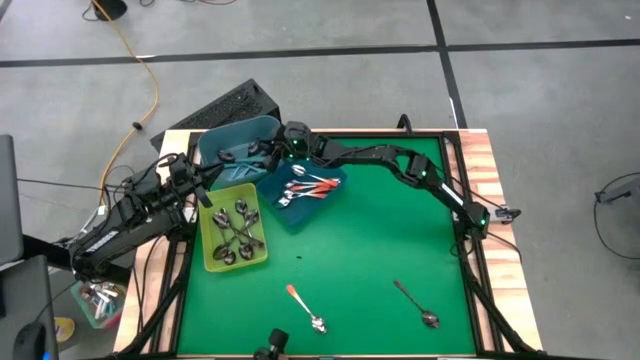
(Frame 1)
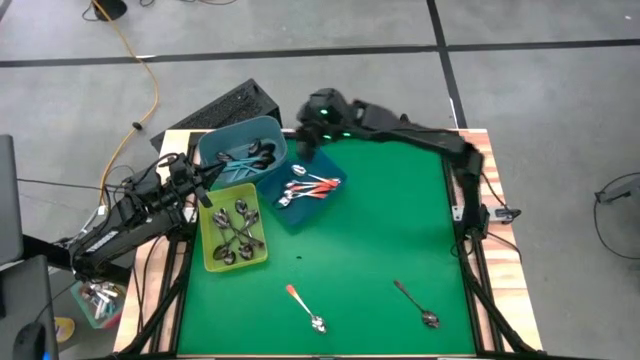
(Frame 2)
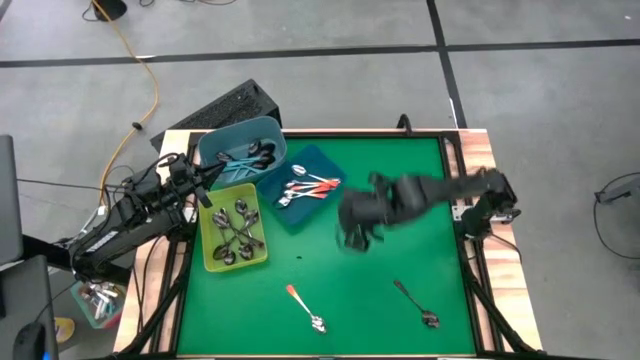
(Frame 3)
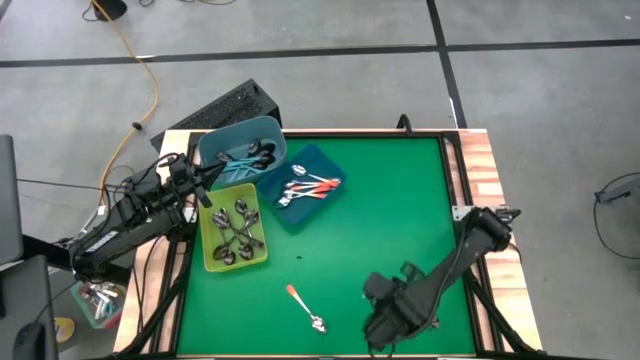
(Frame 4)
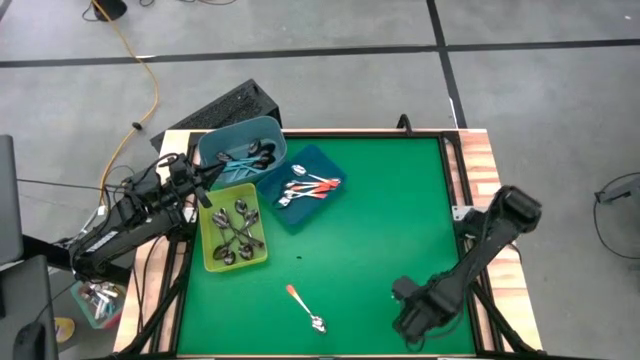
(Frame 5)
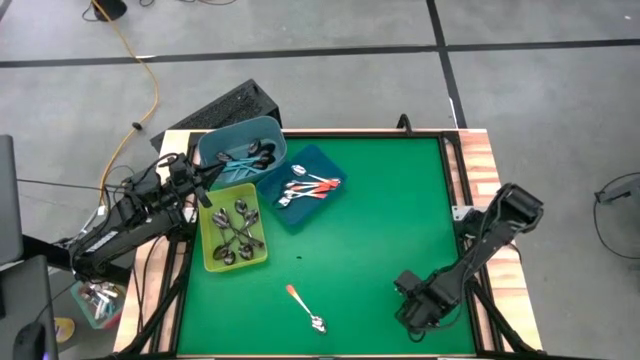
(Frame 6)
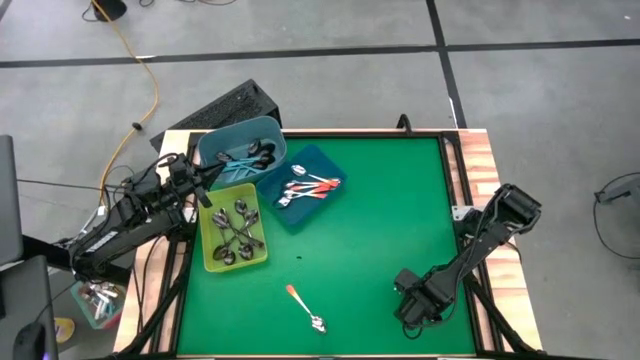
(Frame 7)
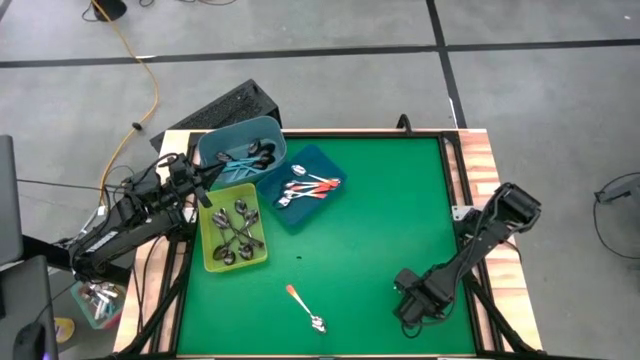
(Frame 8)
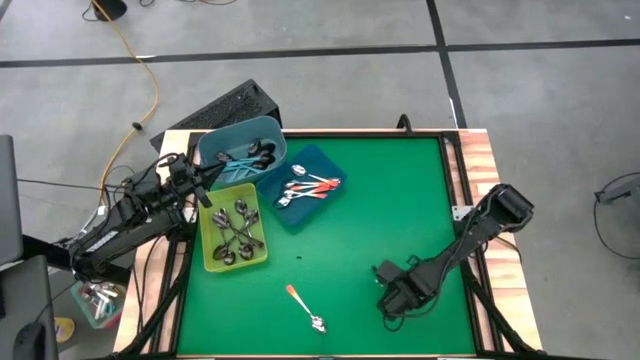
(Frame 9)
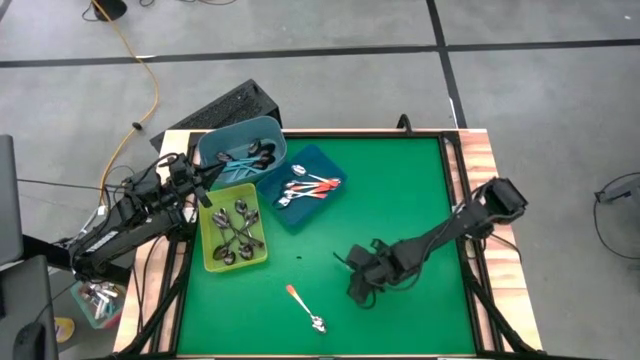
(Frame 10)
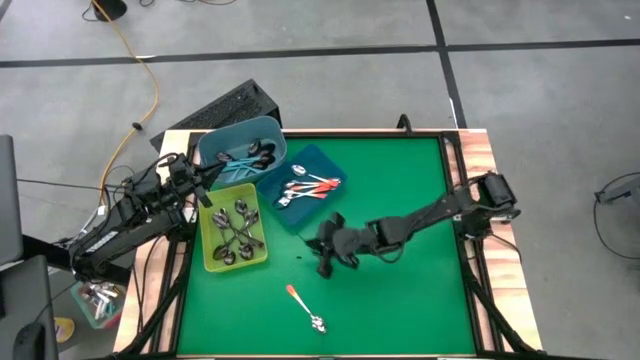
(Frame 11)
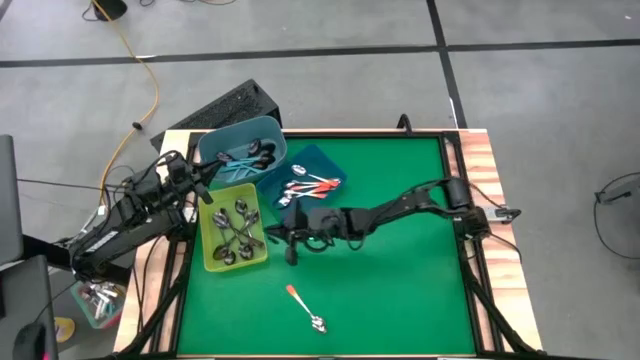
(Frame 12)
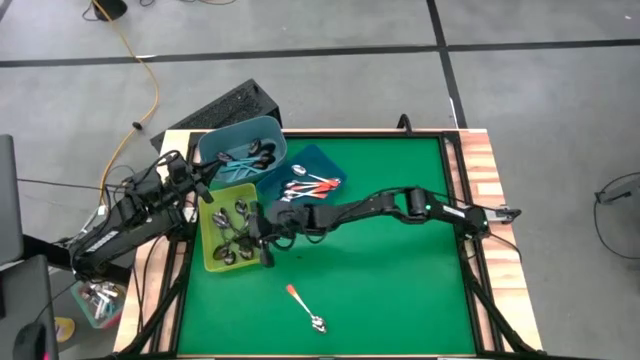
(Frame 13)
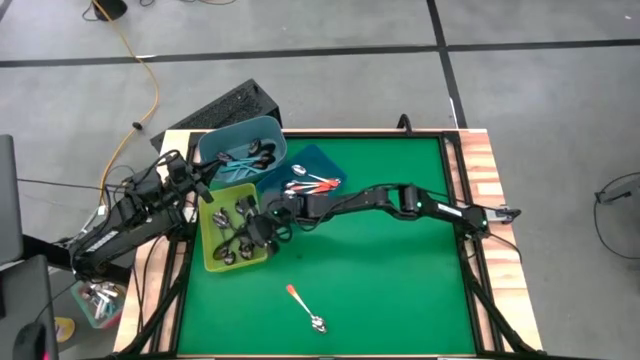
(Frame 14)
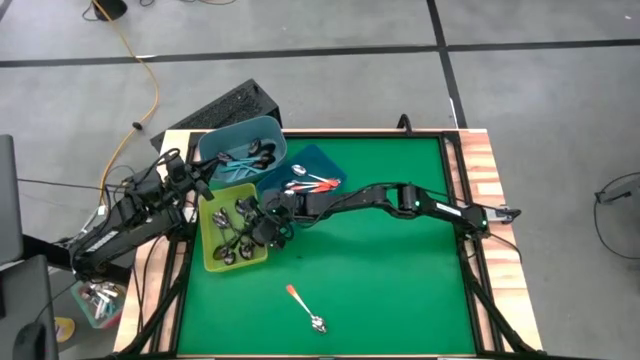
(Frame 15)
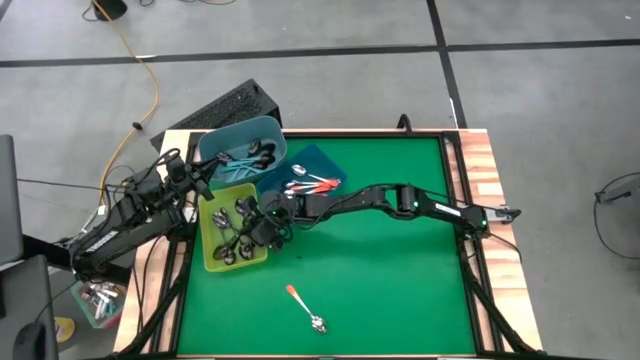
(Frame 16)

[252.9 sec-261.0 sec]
Task: Sort silverware by color (type)
Put the black spoon into the green bin

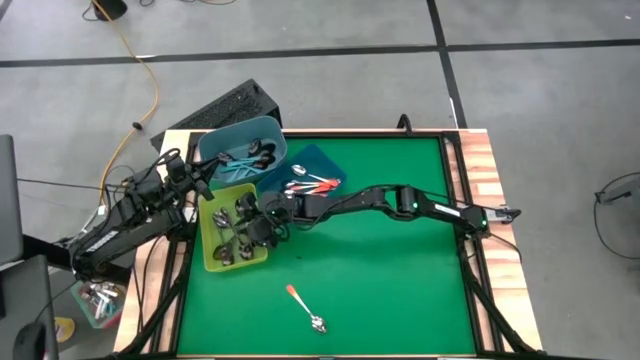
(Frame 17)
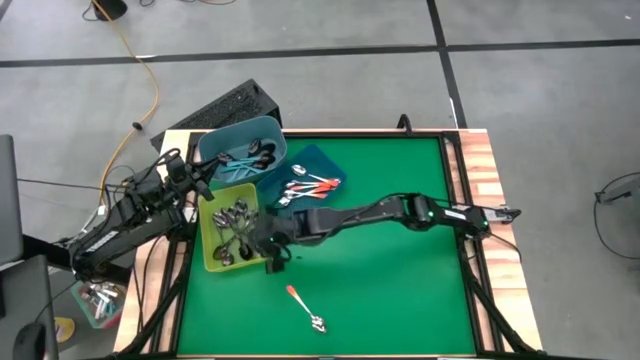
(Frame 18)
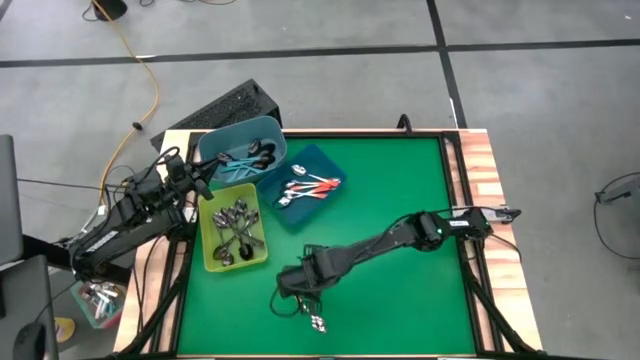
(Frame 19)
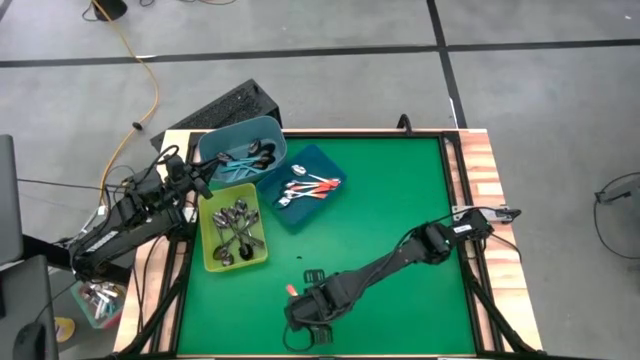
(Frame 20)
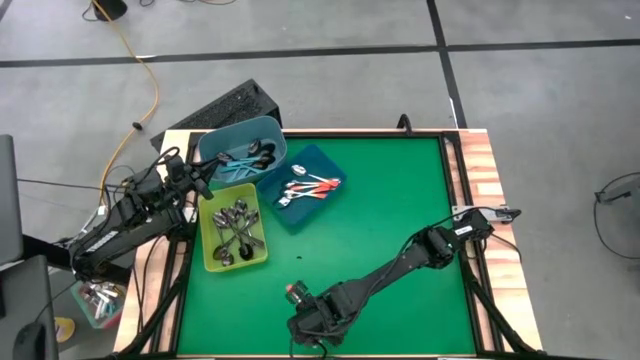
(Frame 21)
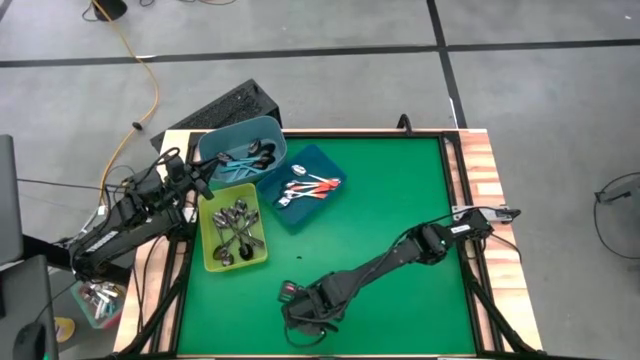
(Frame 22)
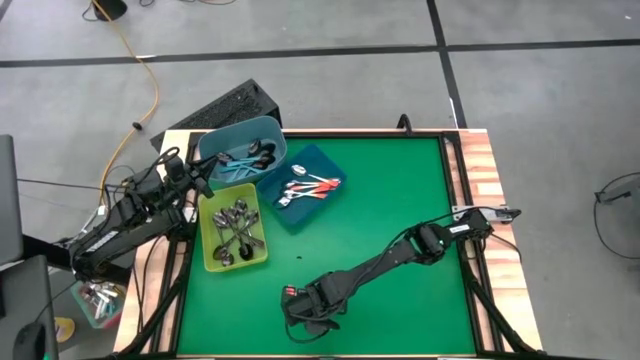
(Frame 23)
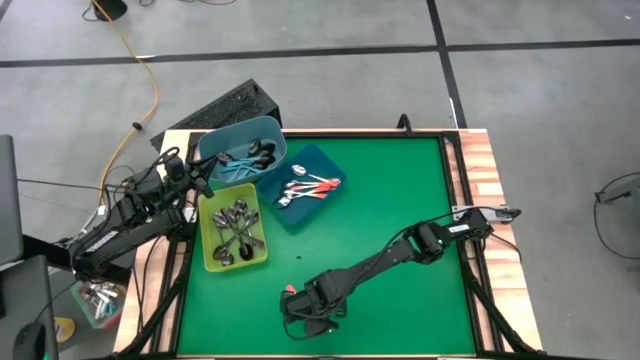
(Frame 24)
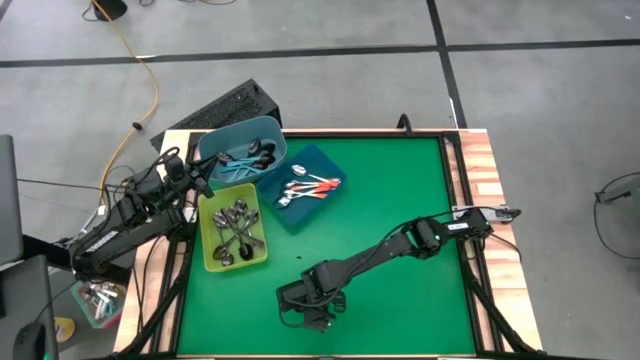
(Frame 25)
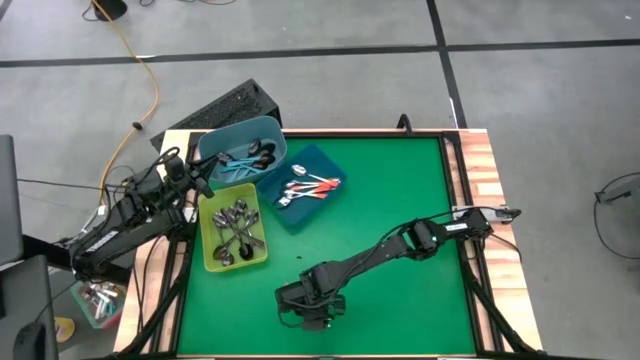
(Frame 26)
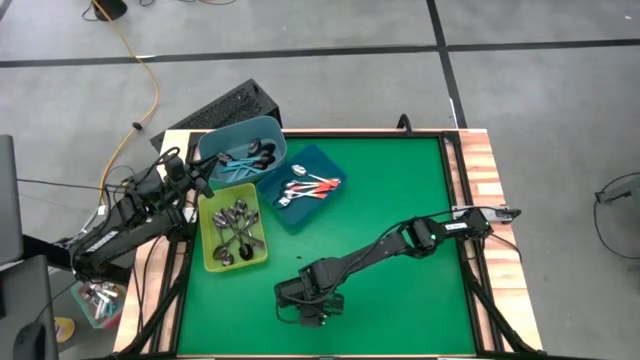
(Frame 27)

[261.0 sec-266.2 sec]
Put the orange spoon into the blue bin

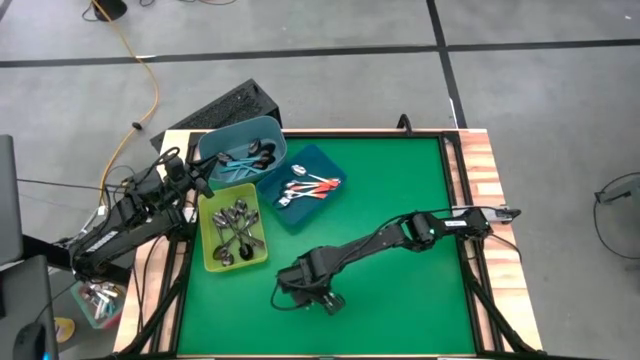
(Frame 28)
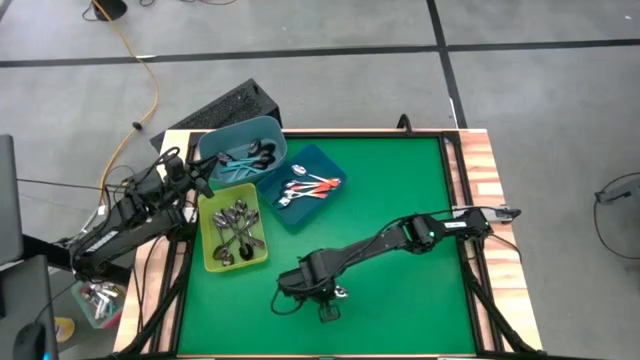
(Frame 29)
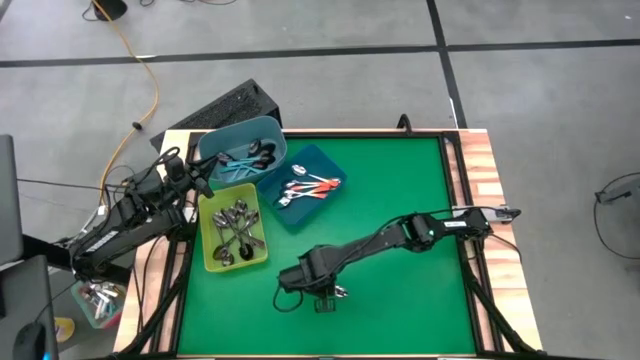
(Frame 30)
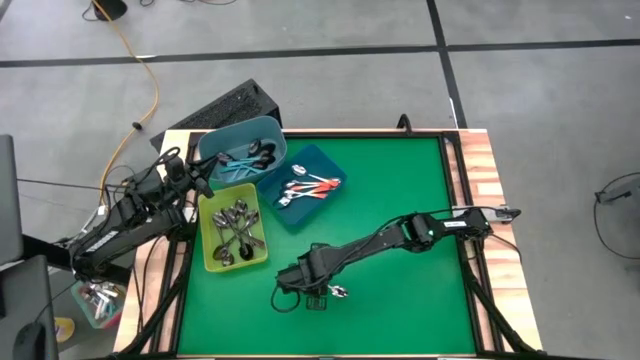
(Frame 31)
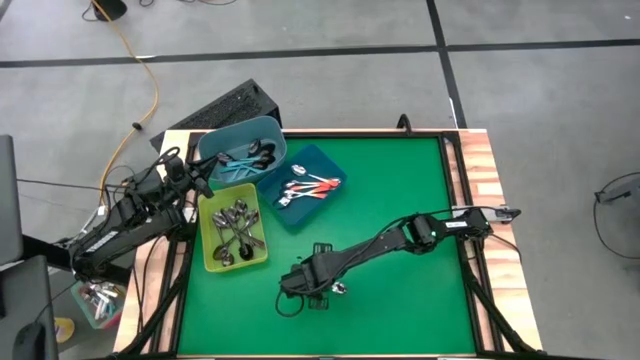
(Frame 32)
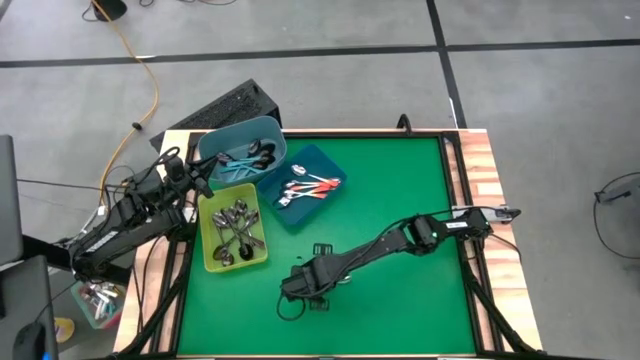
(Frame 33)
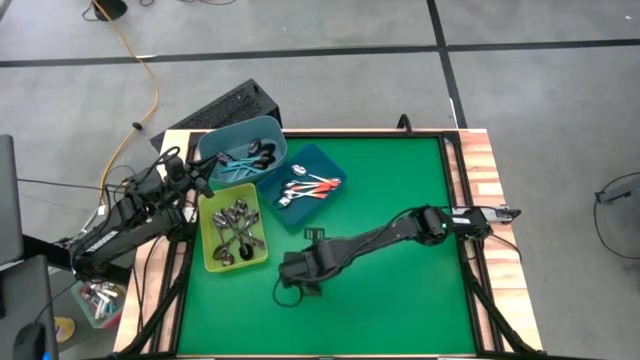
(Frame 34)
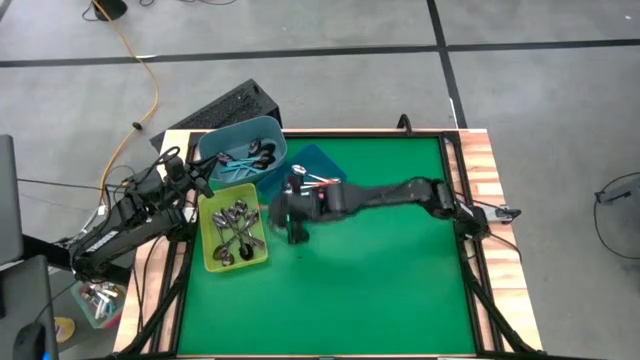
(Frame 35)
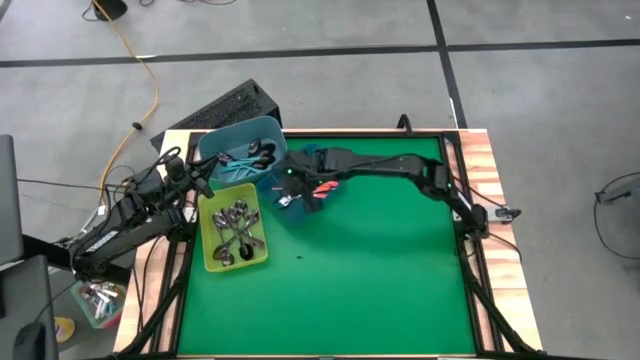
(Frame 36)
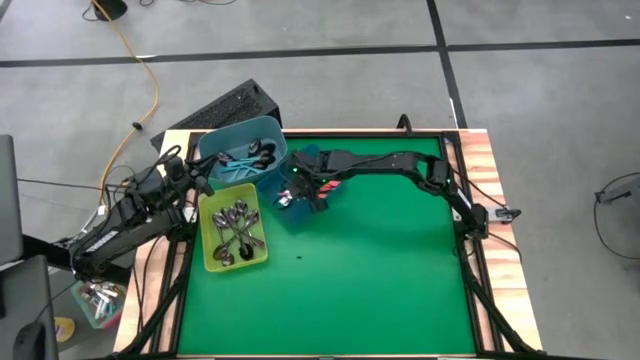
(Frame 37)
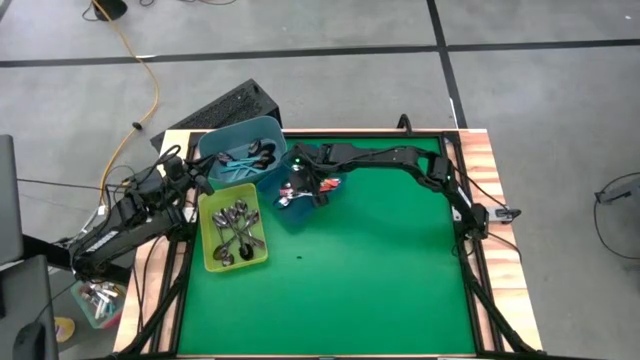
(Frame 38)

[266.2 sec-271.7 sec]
Put the orange spoon into the blue bin
